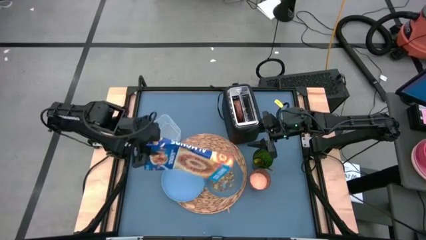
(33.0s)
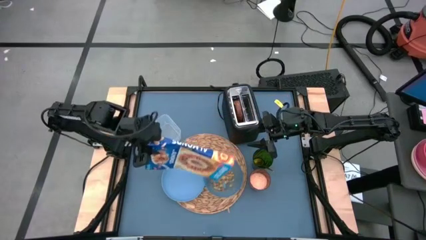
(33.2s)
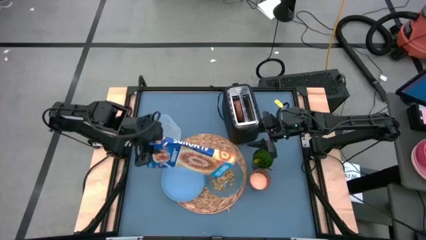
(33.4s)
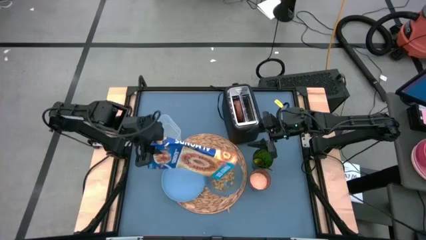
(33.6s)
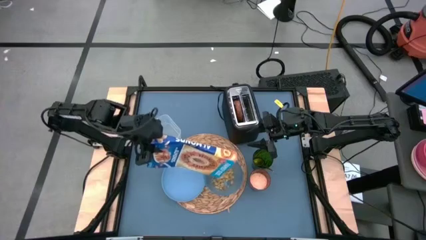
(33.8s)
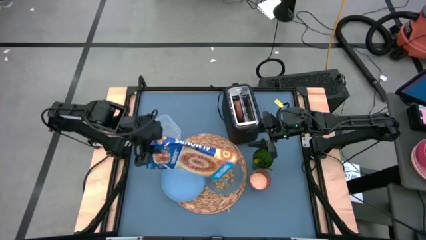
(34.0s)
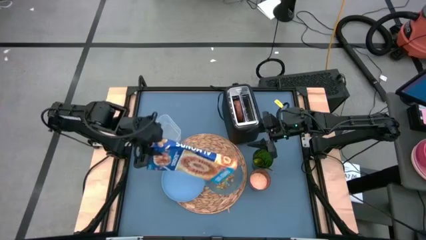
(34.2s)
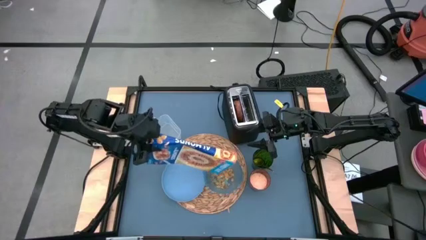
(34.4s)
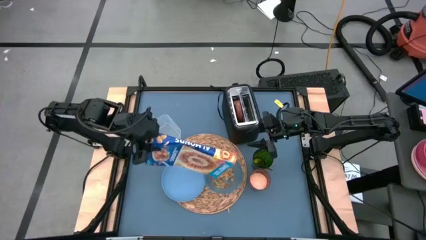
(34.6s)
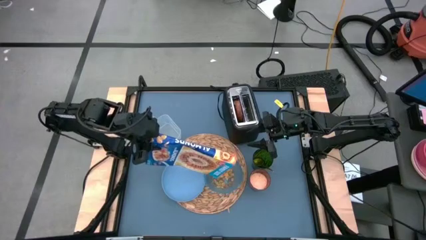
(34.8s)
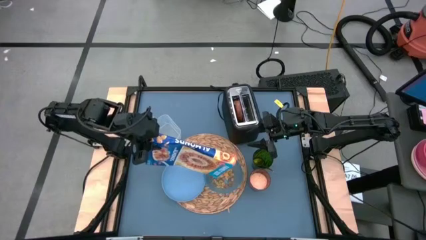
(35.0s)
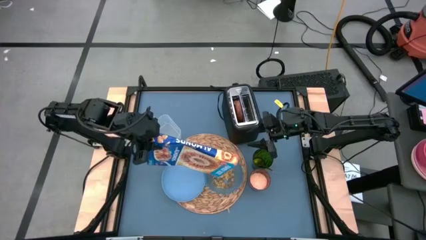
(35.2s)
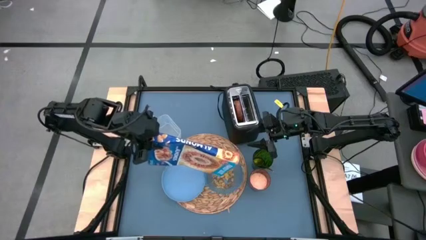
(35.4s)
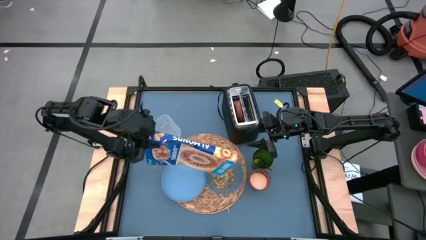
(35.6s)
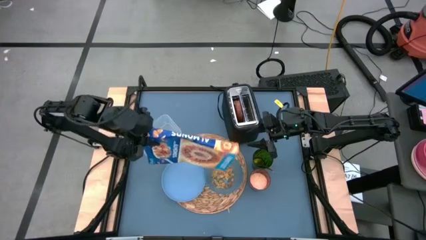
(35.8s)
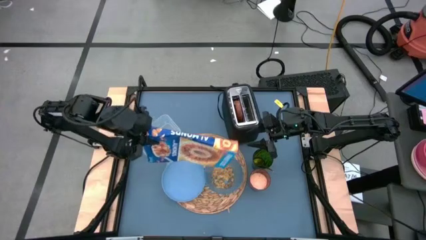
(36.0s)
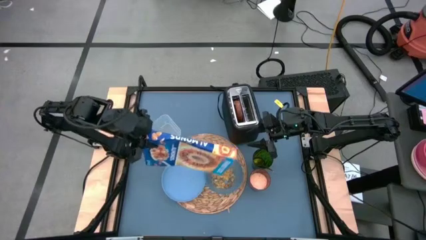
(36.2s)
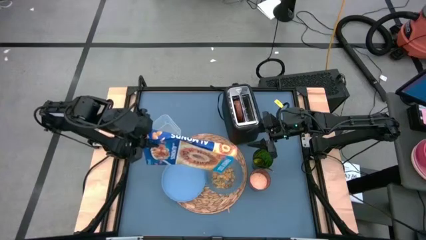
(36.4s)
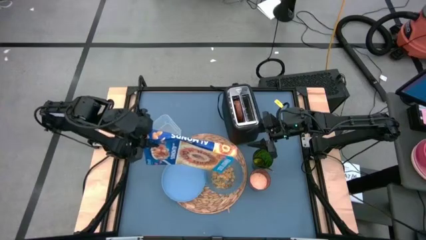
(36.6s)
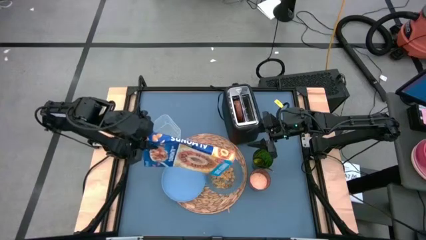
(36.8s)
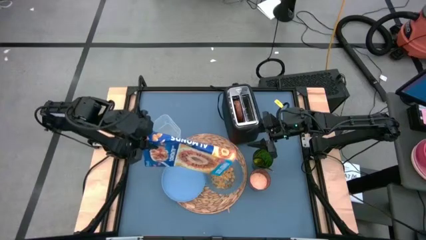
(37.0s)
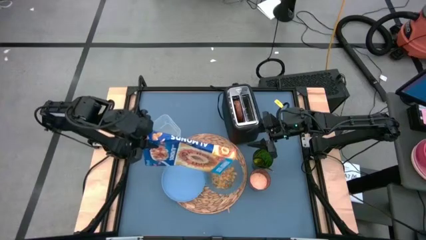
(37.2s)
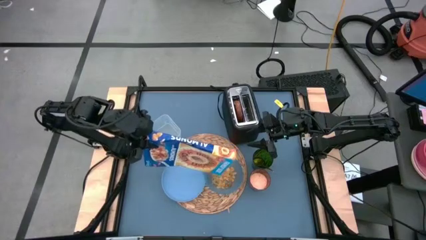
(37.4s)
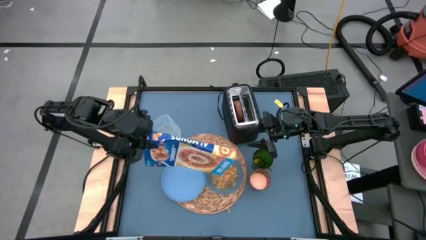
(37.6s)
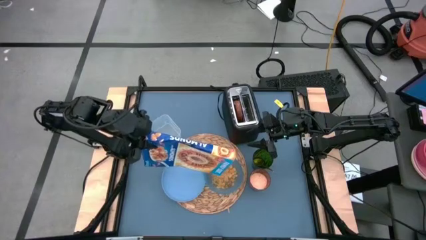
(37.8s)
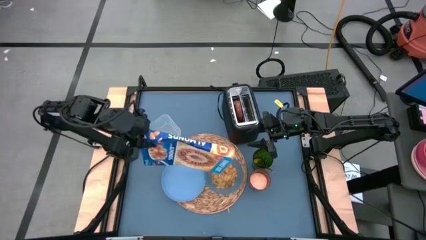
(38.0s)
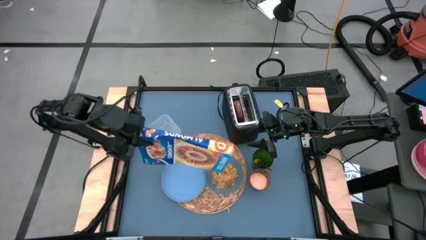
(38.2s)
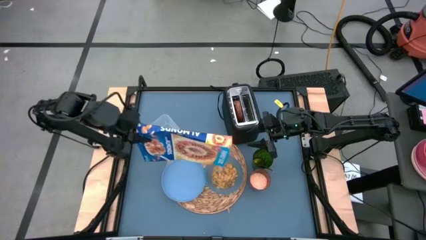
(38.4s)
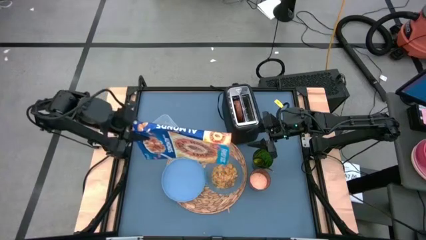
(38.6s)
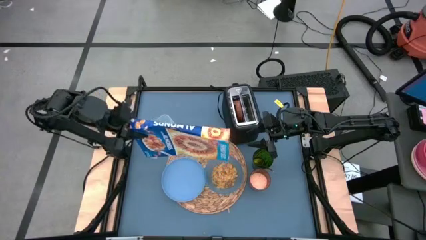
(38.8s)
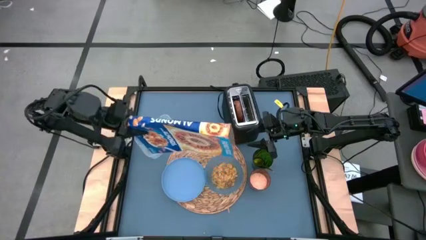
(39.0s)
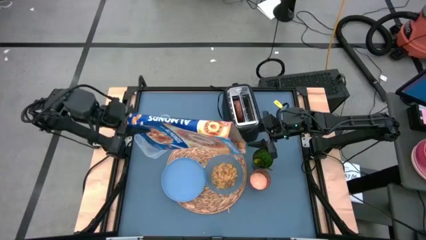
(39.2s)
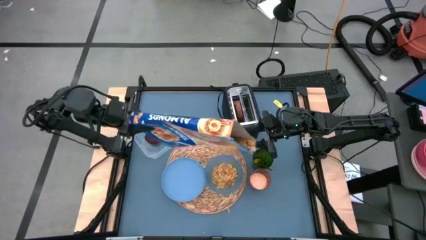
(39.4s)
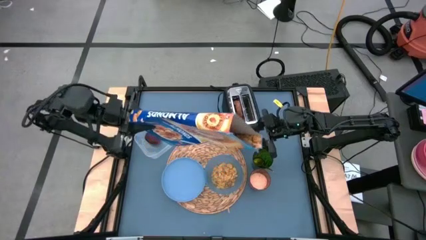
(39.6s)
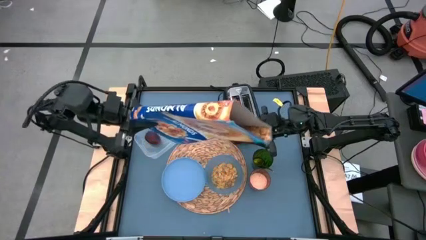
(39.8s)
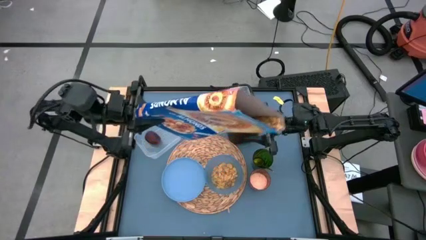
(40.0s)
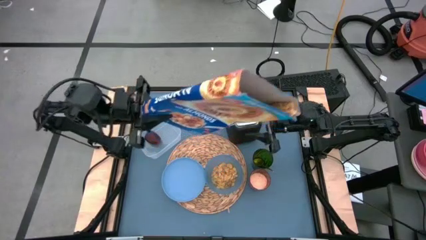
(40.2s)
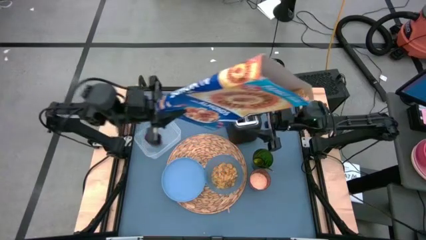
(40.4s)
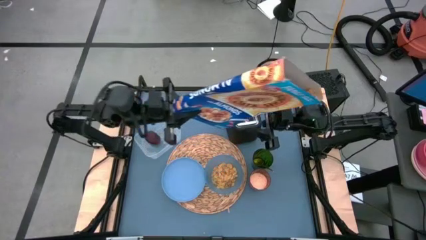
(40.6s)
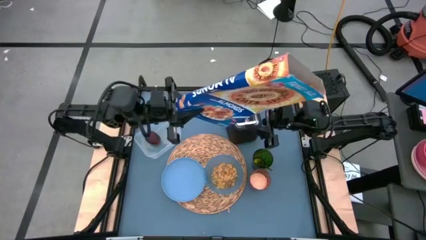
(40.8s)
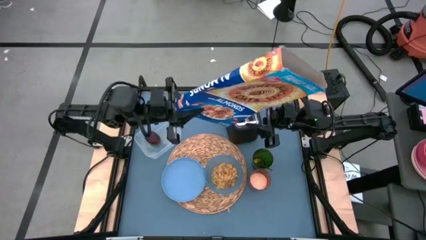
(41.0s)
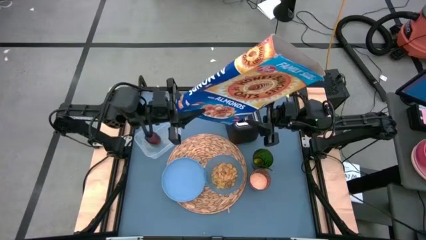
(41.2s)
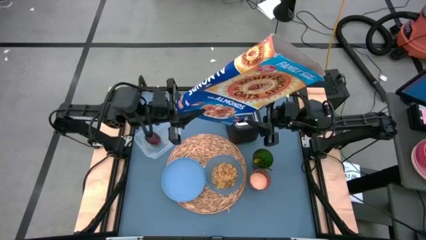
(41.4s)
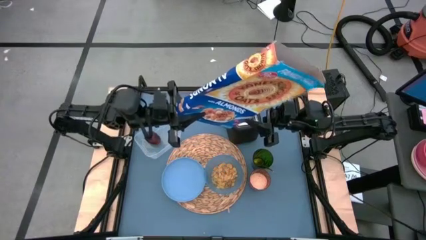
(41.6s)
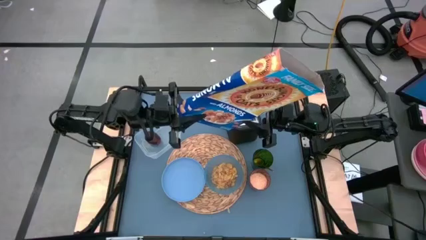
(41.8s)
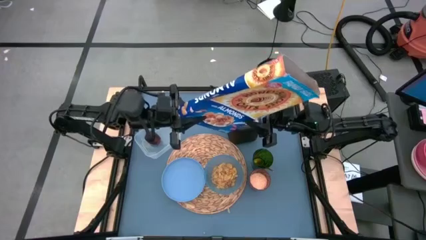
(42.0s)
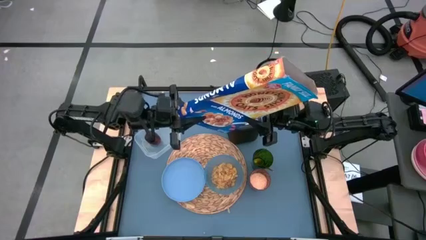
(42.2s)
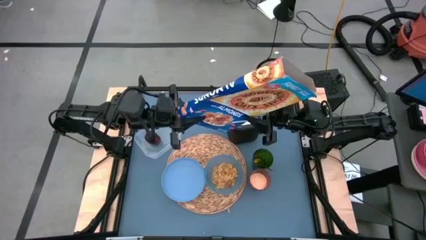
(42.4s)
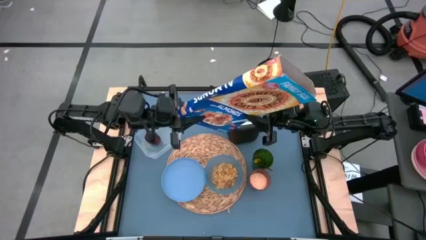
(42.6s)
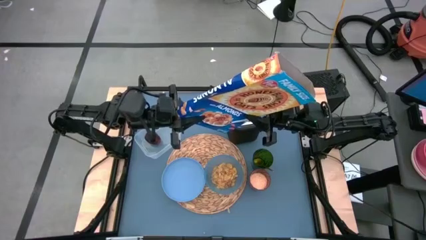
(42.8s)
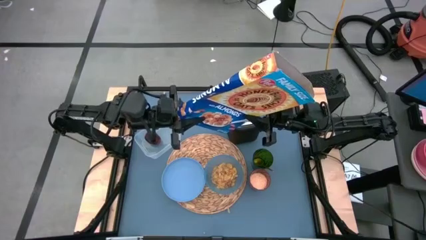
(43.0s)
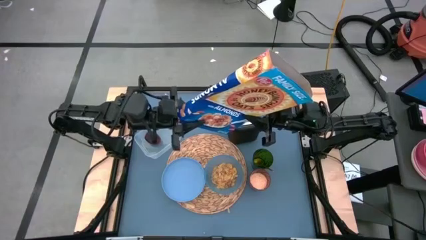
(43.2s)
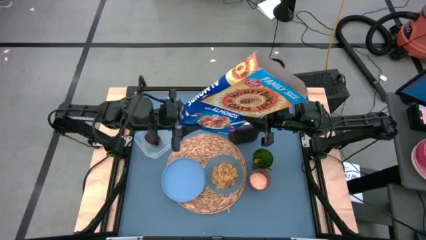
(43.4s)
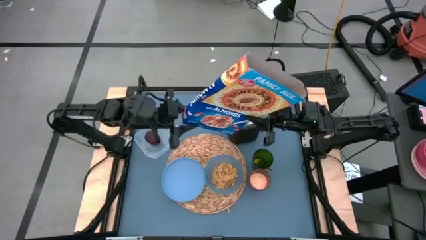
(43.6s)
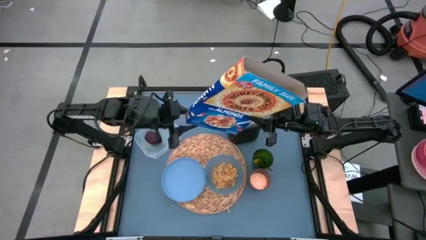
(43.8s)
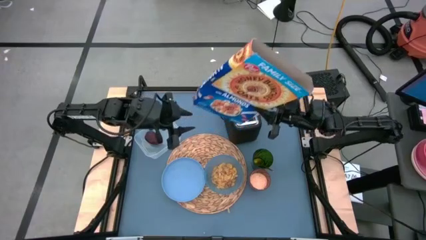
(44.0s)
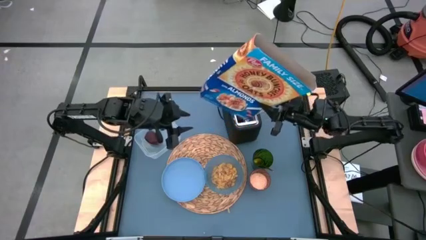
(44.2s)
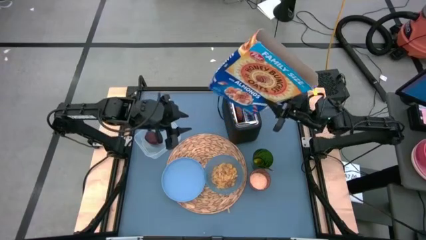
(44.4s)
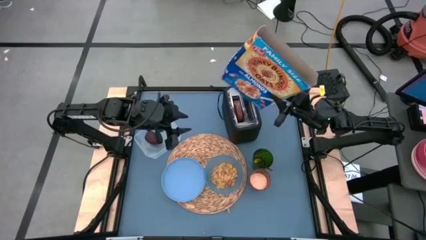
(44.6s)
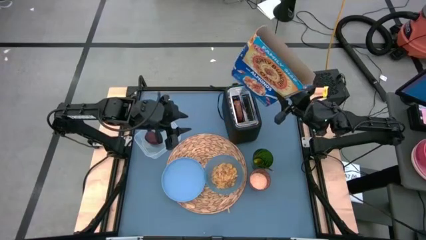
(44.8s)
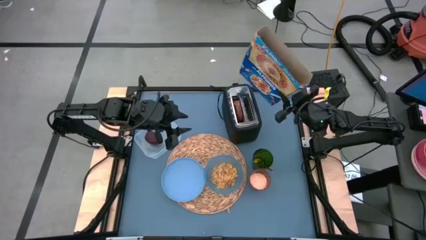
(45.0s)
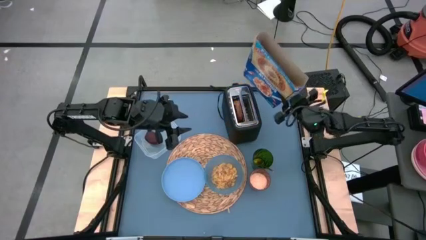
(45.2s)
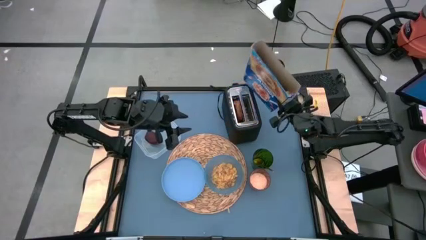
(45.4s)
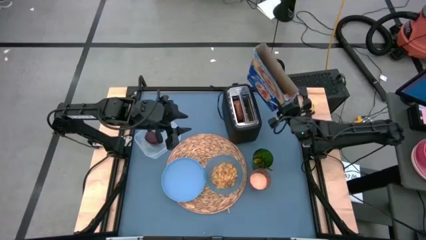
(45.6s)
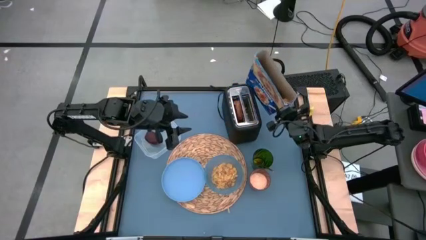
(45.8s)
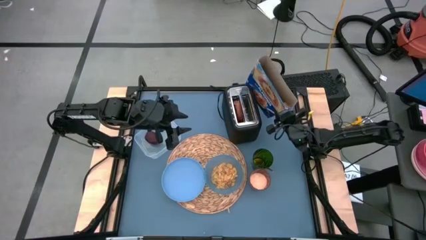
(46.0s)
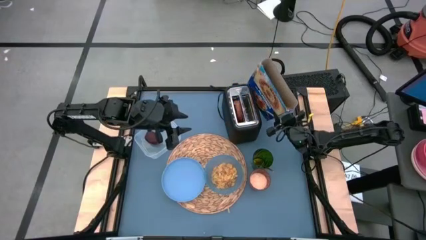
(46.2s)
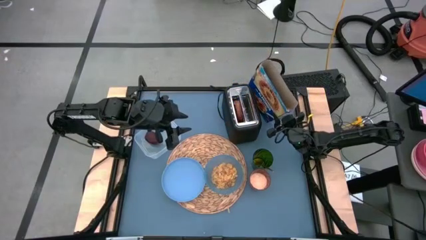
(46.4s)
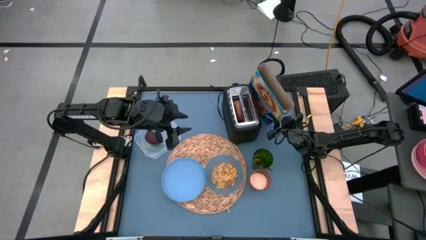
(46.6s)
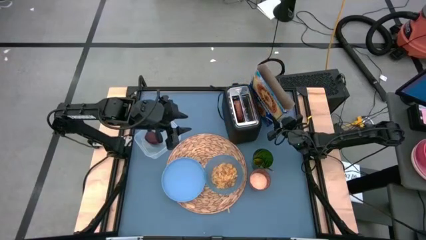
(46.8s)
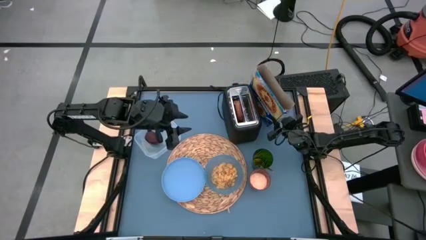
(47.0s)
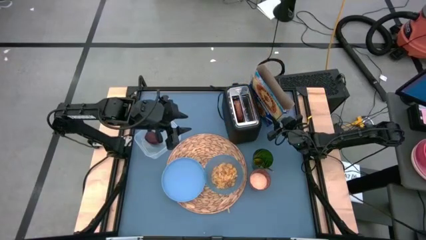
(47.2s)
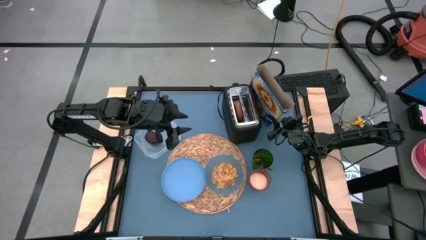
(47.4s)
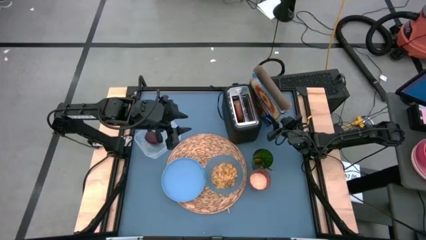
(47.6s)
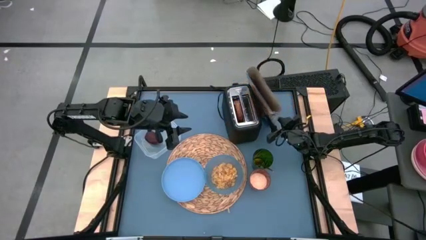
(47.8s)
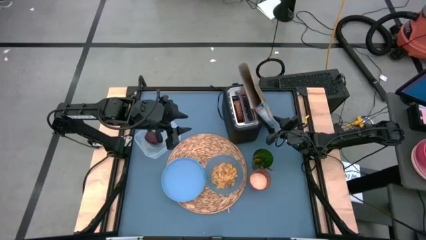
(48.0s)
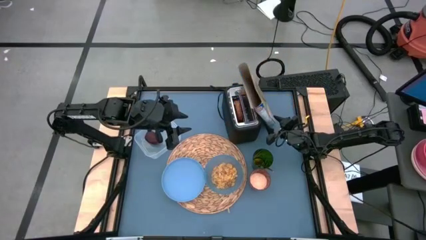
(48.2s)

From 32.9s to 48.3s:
Task: Arrange a breakfast setting
Pour the cereal from the cereal box into the blue bowl on the table mat
